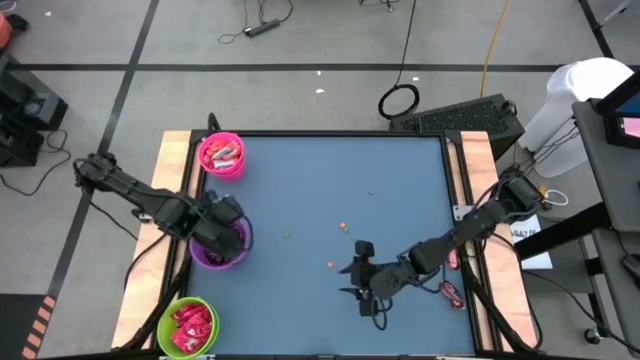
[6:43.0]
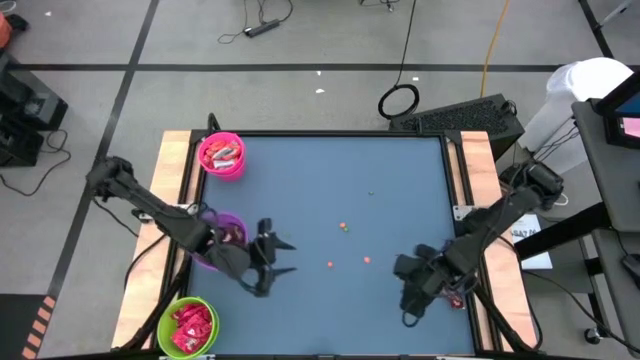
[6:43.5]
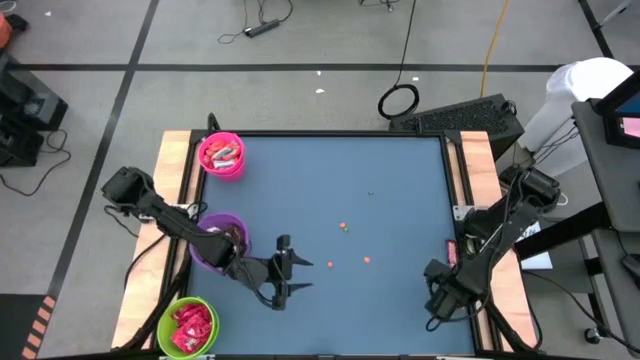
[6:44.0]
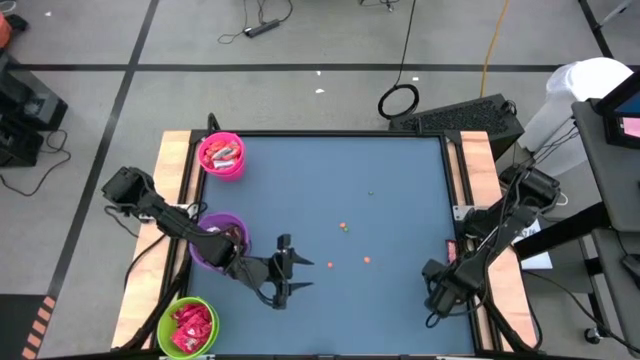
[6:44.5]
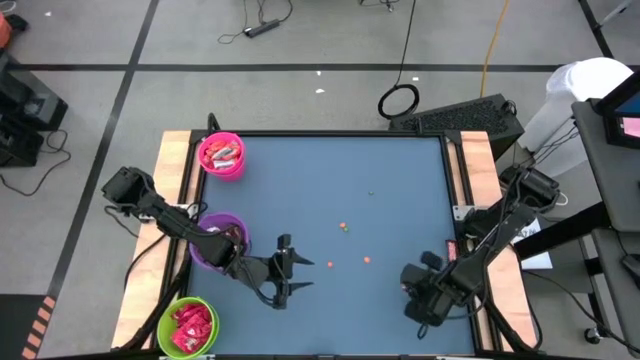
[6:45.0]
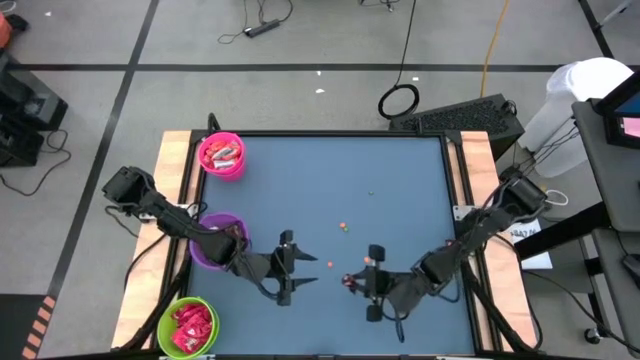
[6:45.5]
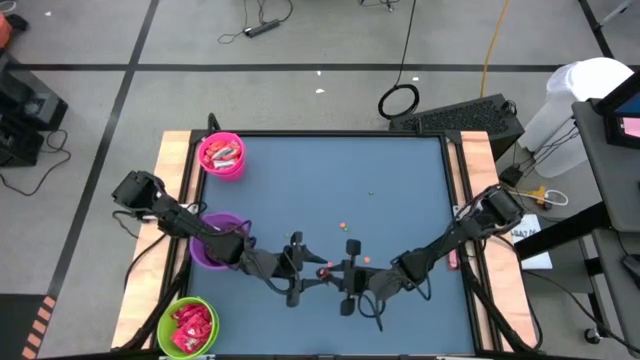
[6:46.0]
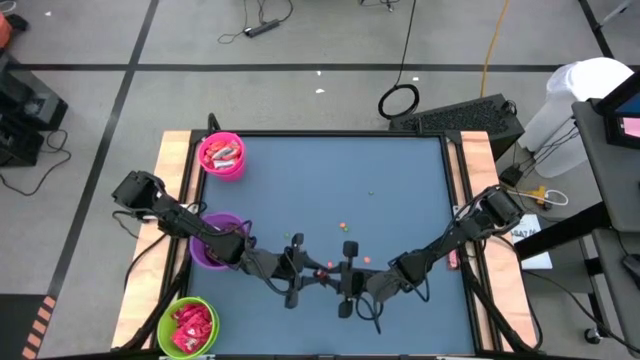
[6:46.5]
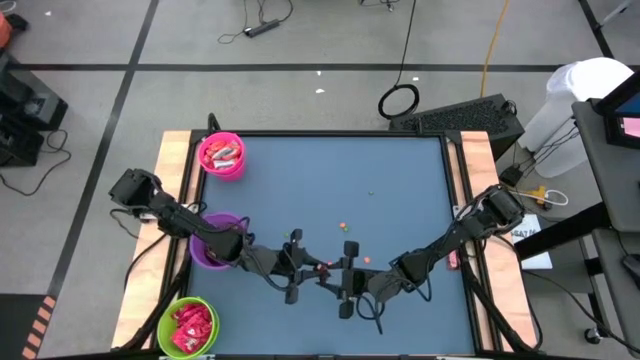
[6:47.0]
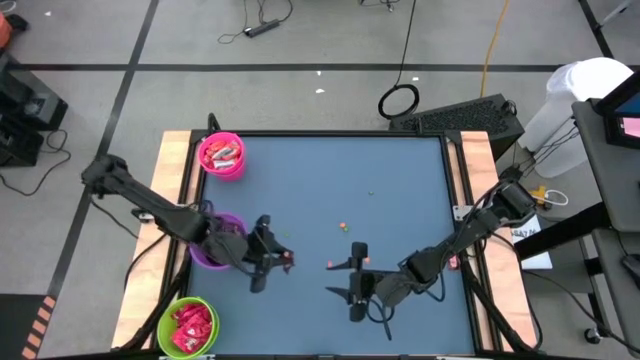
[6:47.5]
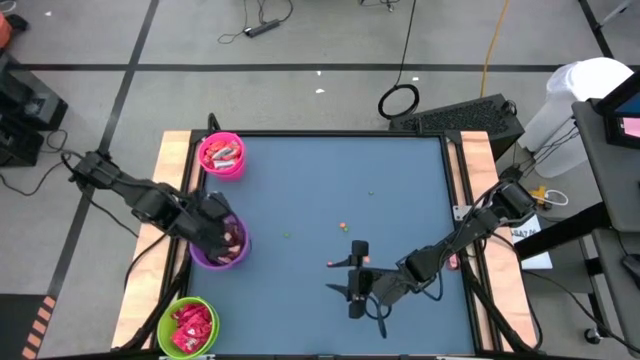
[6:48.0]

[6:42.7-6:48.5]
Task: Organize candy in baskets
Put the brown chocolate into the violet bucket

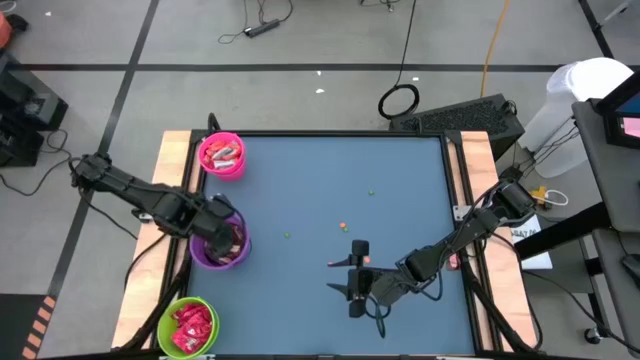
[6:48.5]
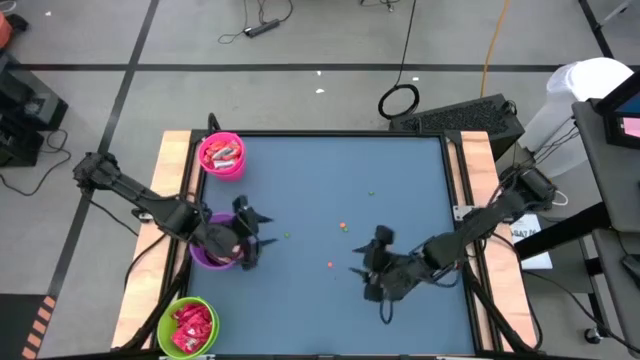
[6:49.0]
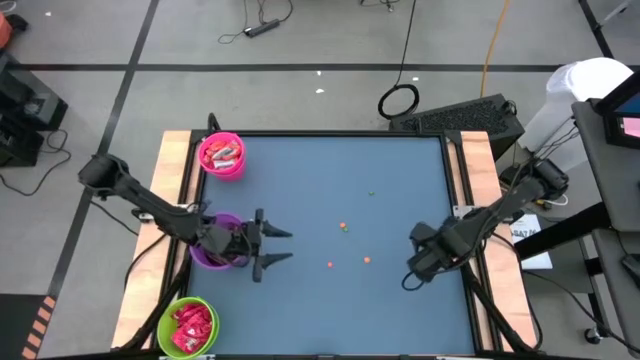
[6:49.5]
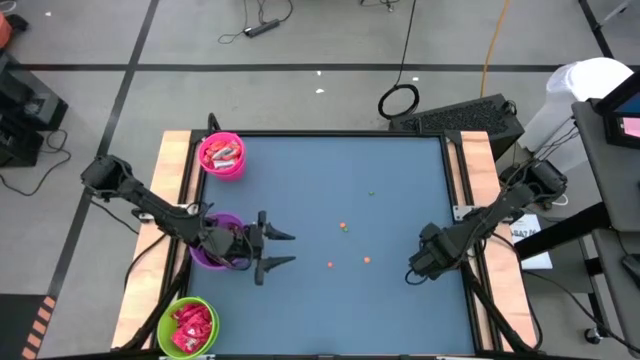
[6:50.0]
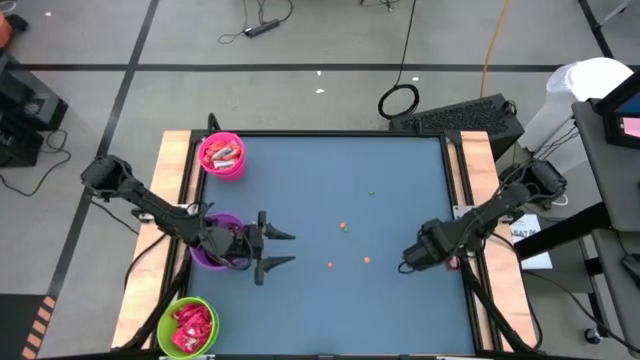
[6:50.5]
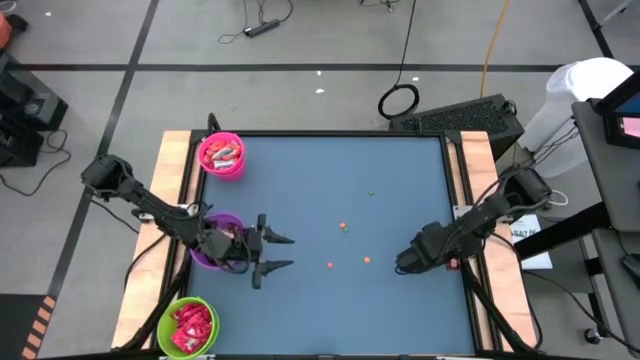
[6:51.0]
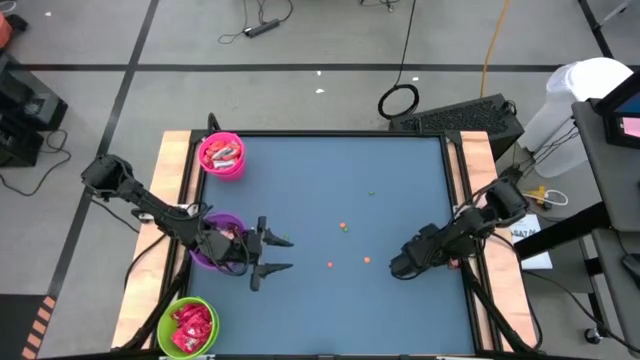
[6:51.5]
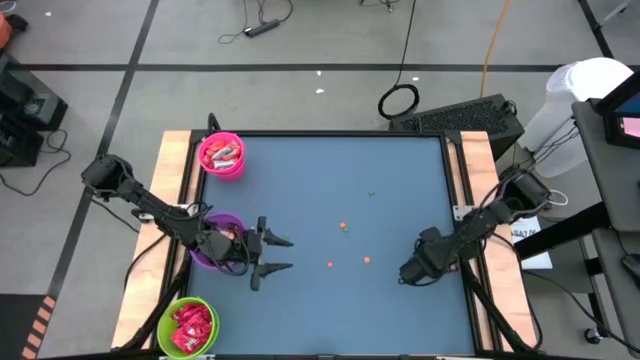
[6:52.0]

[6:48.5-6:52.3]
Put the brown chocolate into the violet bucket

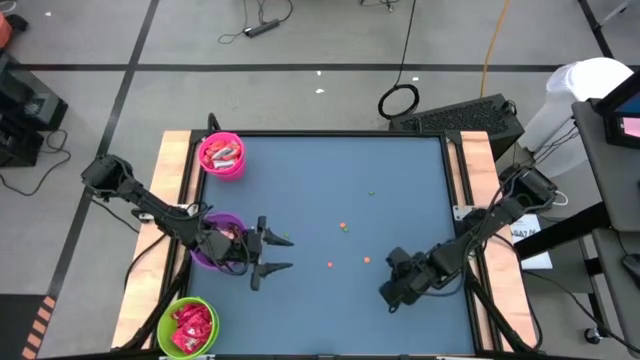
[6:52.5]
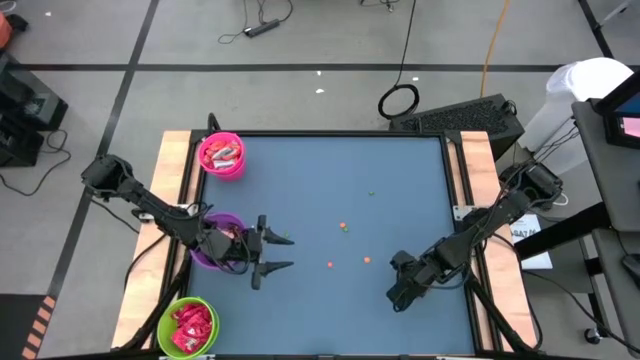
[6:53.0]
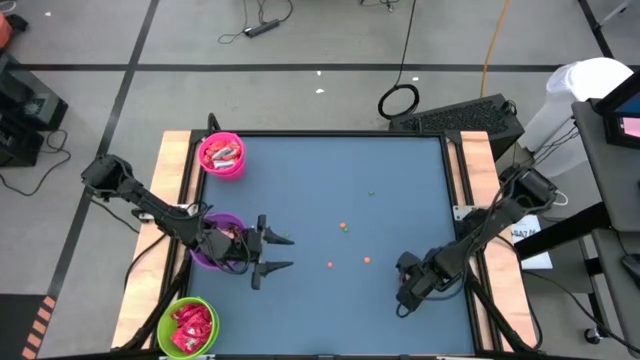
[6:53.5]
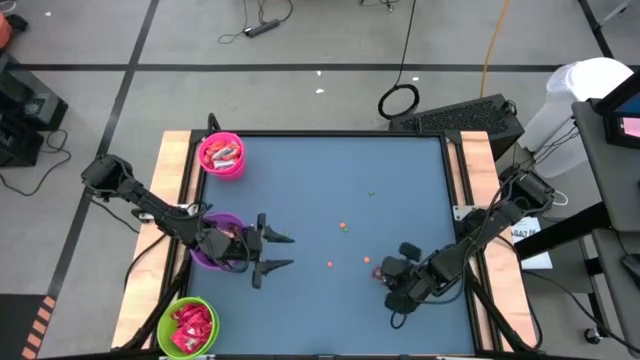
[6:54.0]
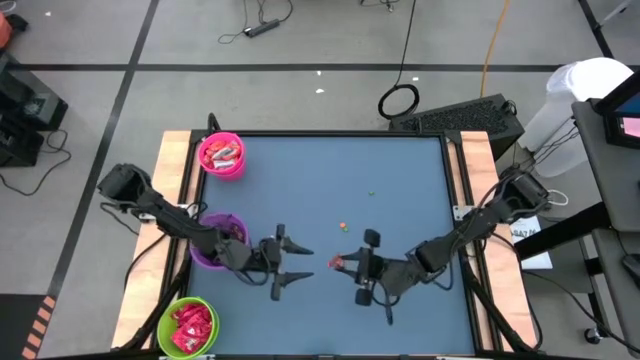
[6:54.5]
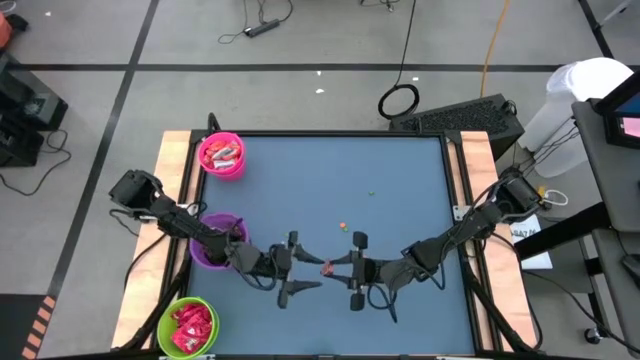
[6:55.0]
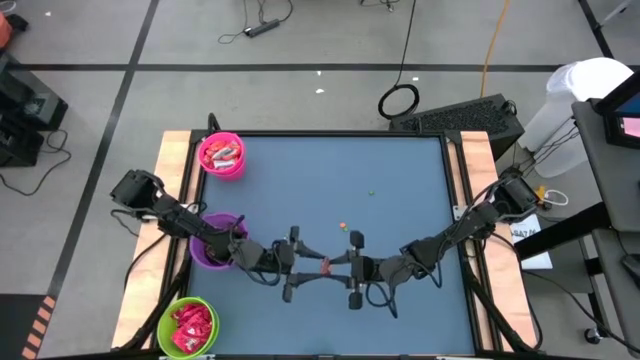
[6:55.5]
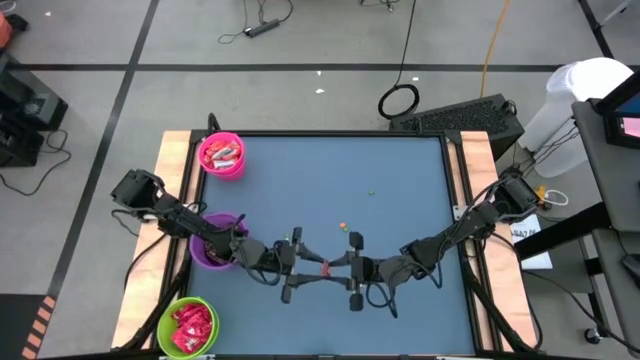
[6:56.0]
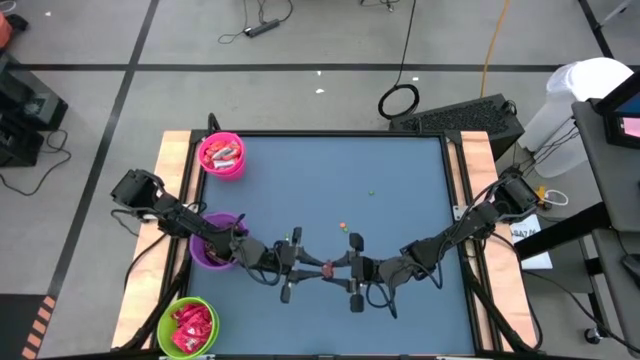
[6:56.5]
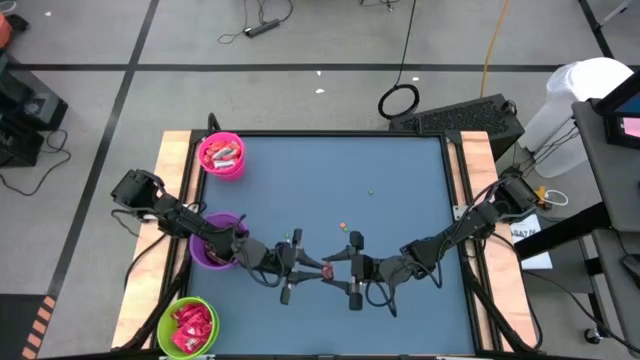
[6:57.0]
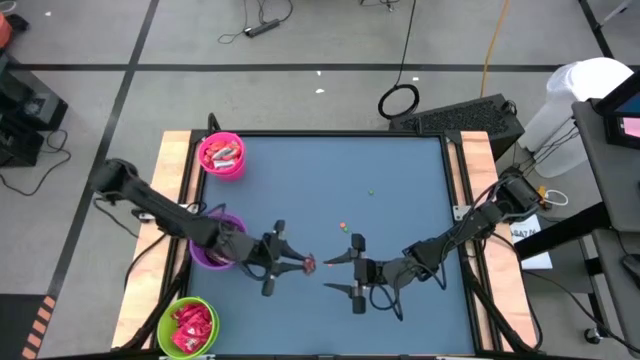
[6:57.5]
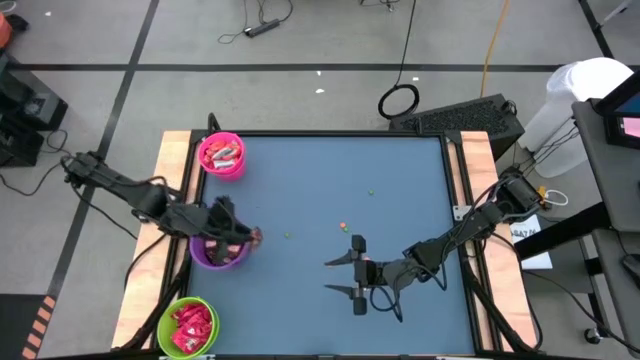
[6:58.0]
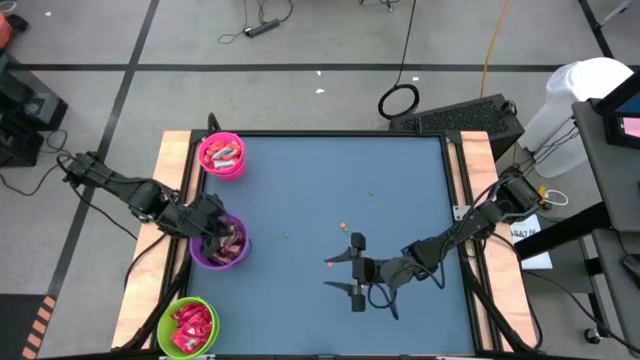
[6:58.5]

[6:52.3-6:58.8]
Put the brown chocolate into the violet bucket

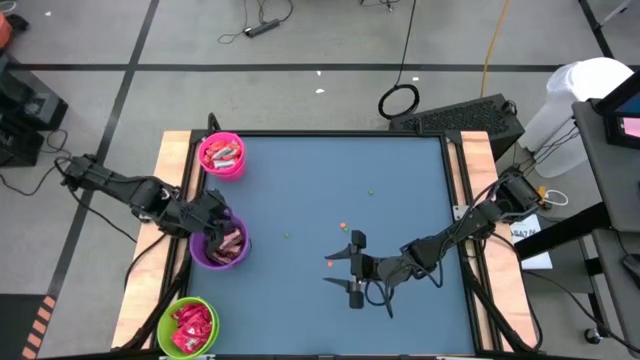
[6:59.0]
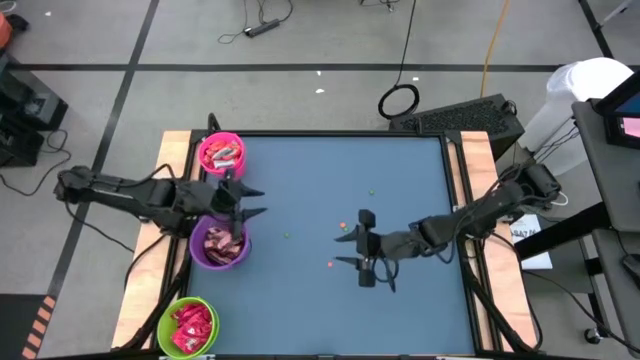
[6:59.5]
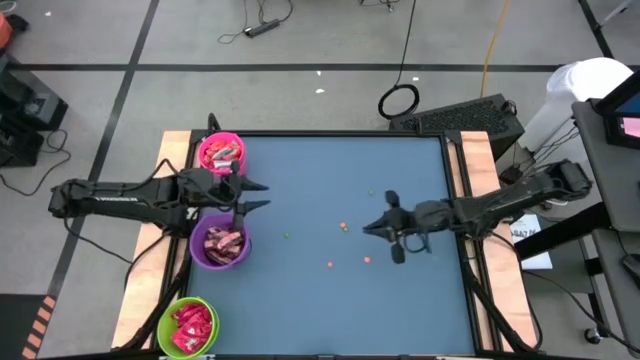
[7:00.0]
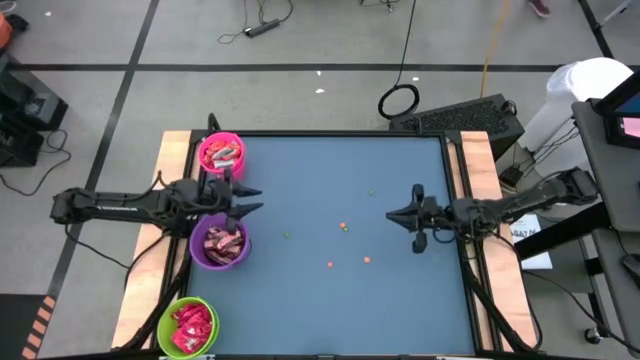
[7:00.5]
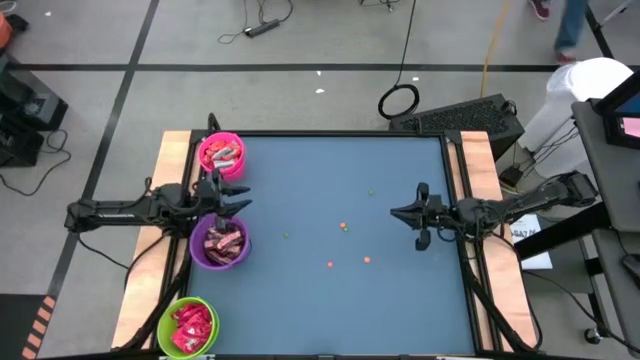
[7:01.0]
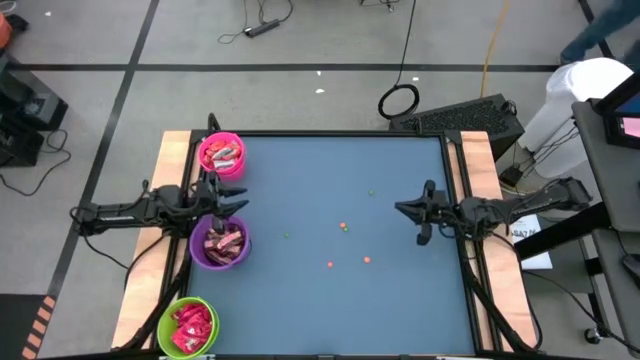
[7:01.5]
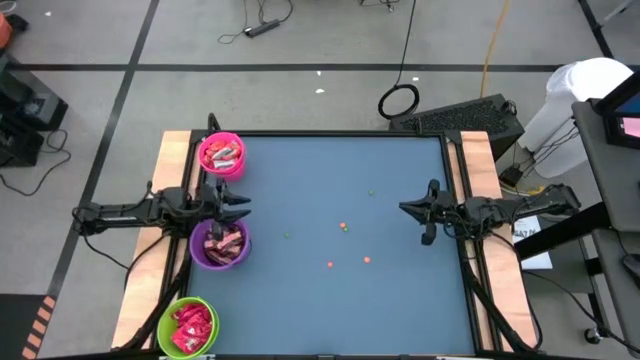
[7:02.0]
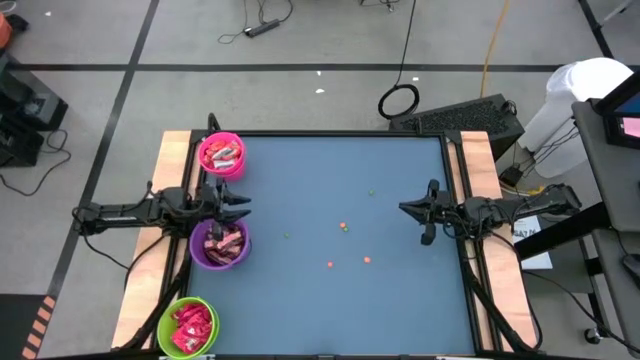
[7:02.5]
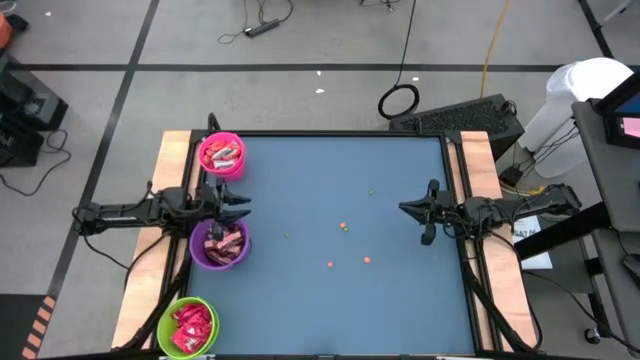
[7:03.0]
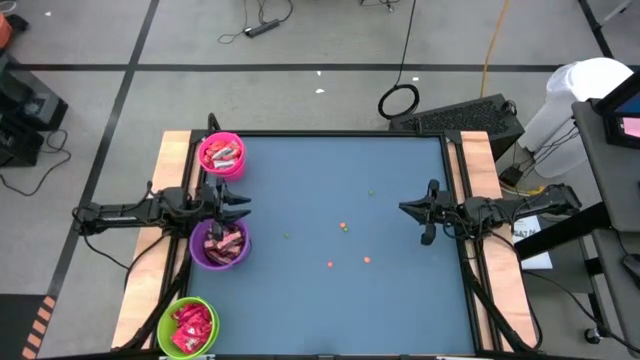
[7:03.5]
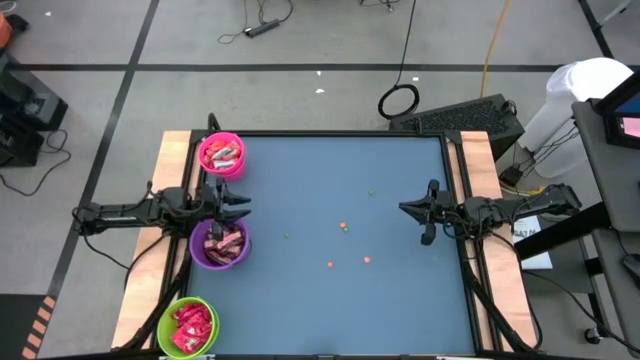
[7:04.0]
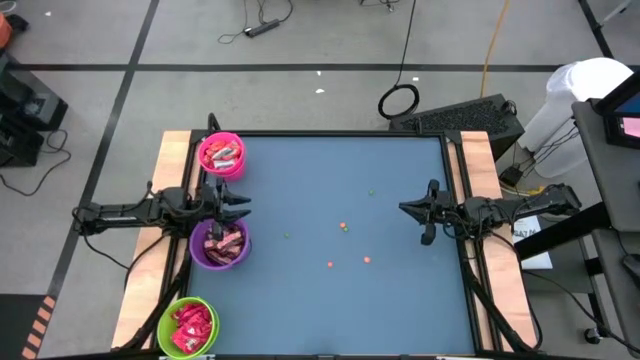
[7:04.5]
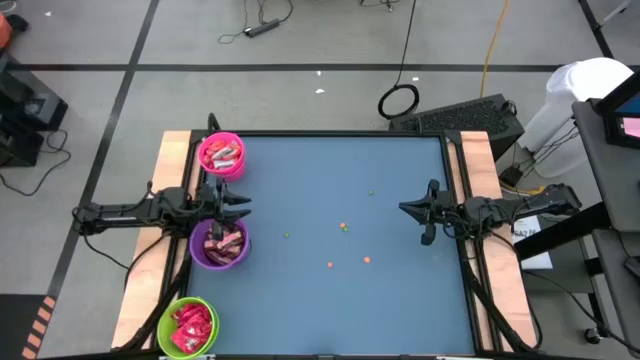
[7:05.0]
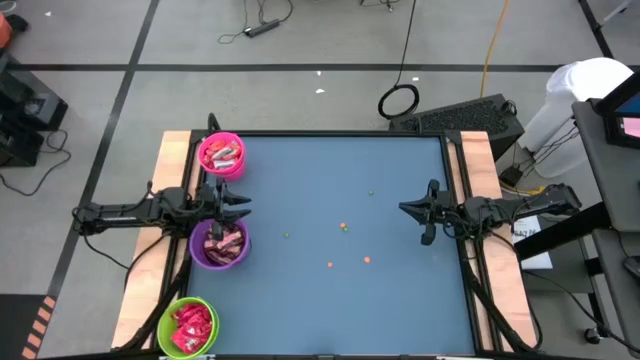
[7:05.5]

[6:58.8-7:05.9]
Return to Home Position
